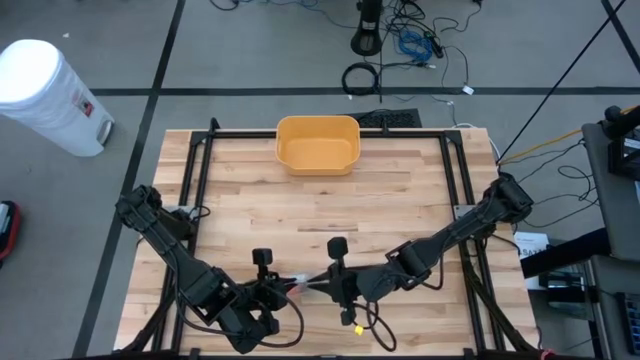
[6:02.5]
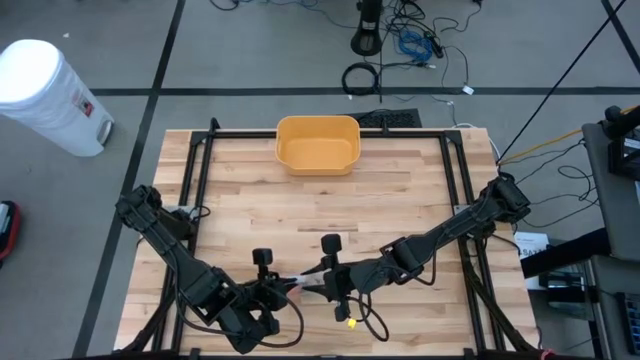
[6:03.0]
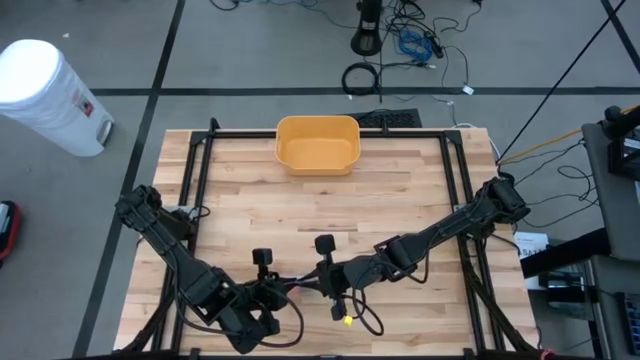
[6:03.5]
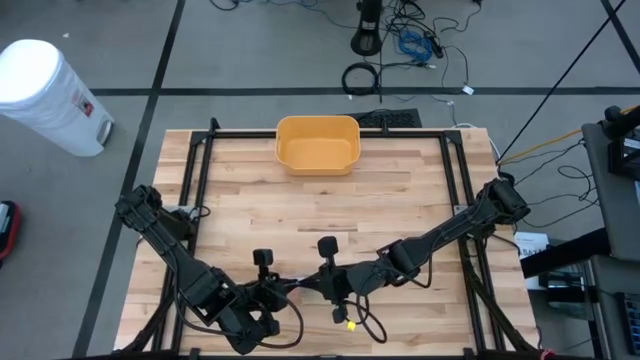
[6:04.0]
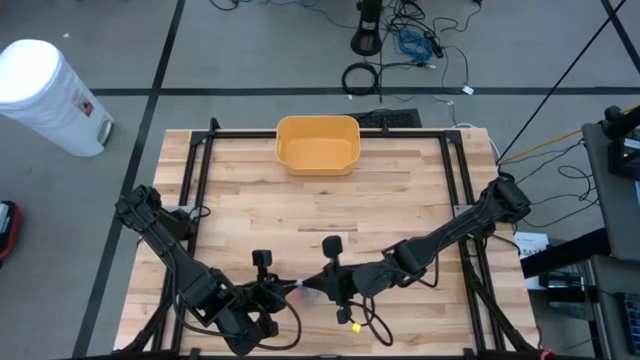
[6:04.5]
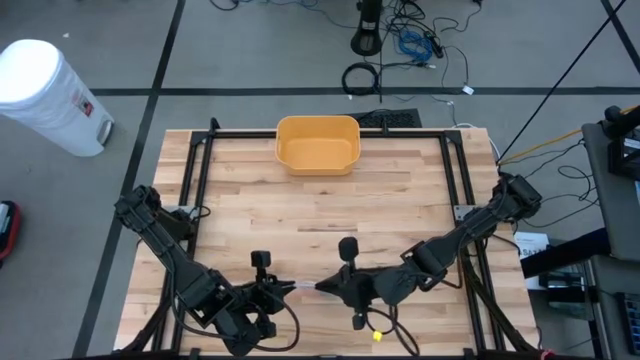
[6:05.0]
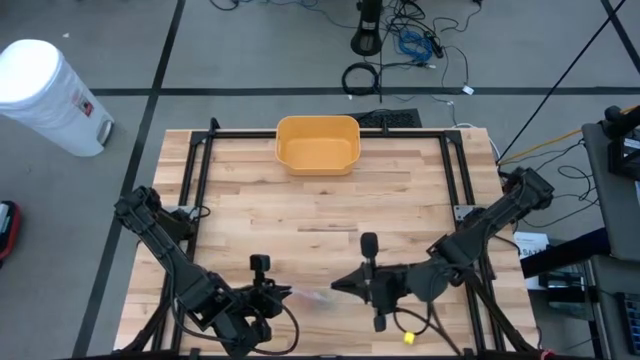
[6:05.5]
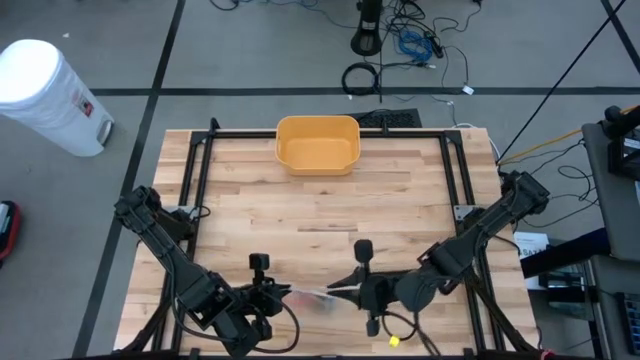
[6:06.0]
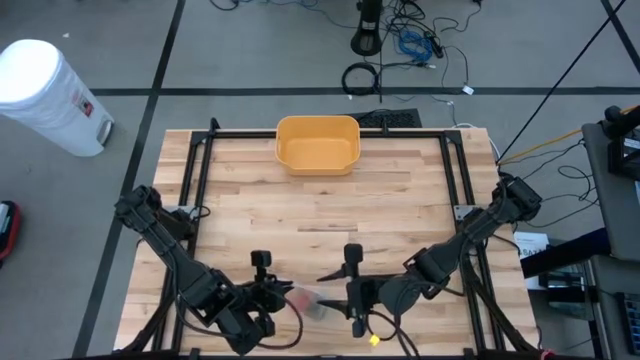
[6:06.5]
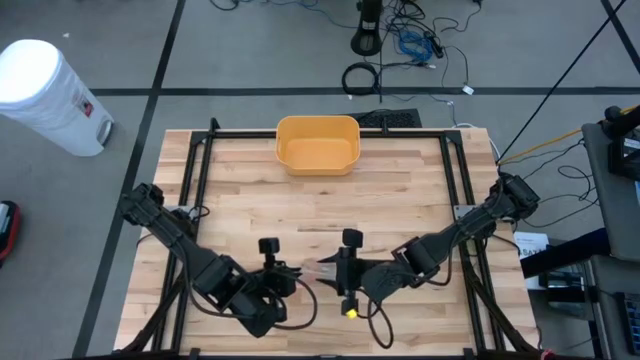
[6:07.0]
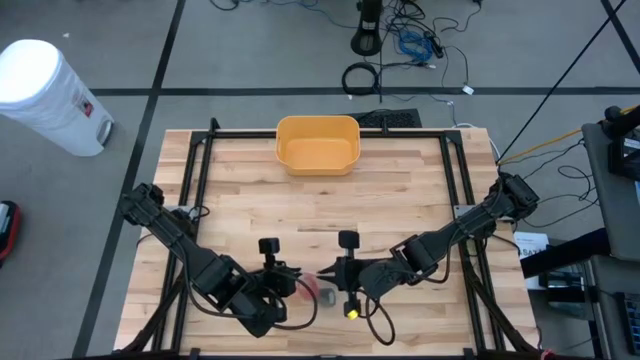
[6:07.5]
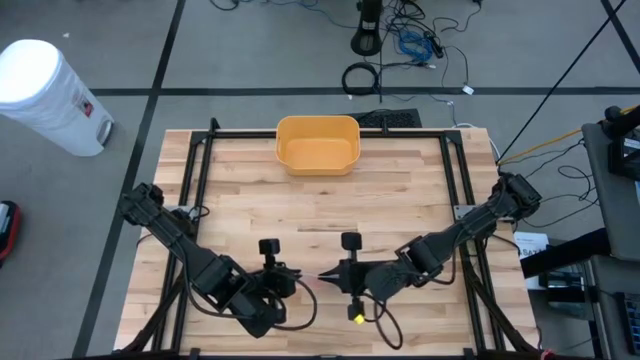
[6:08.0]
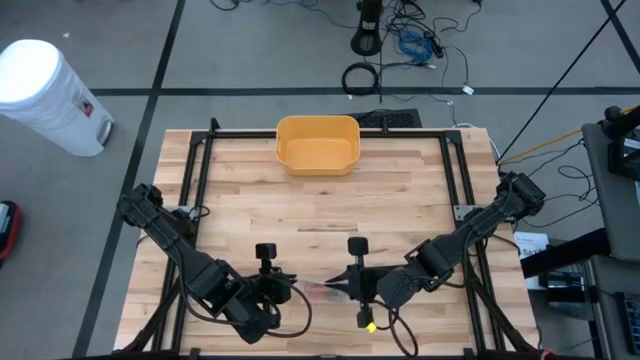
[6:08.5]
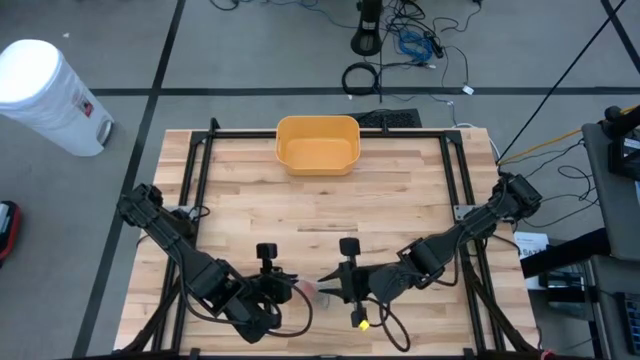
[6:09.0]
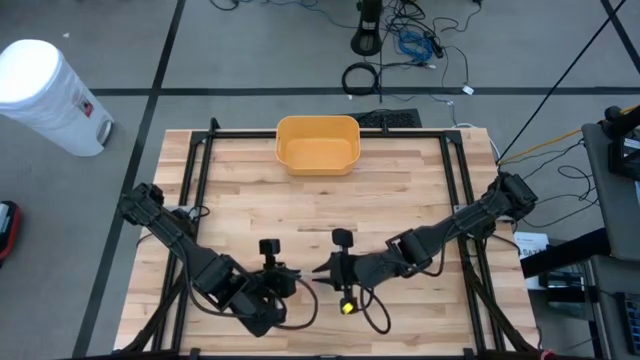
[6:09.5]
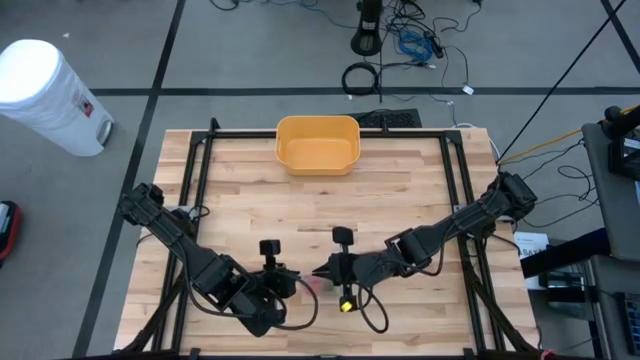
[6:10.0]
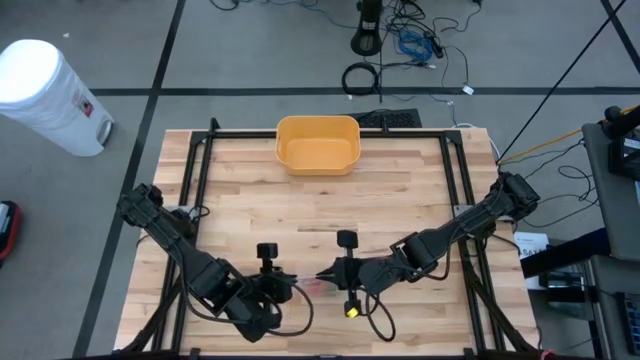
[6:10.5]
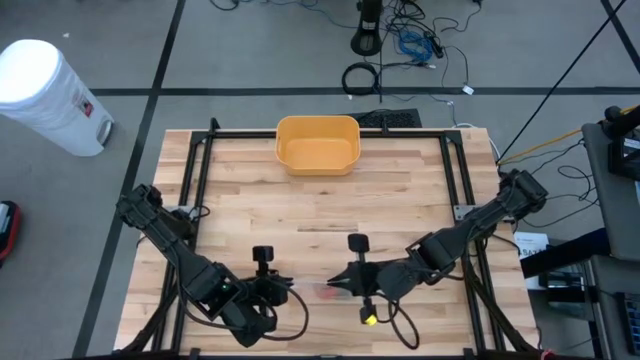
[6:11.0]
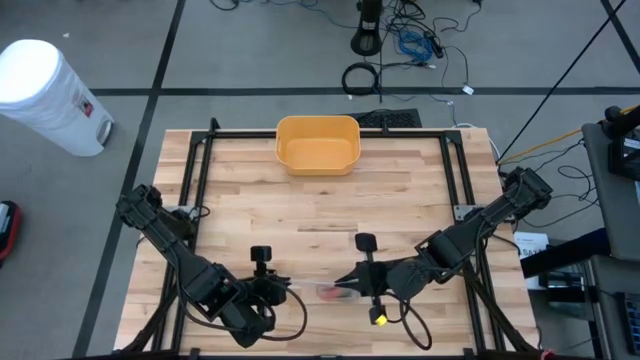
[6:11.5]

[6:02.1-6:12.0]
Task: Roll bandage
Close the transparent zip bag

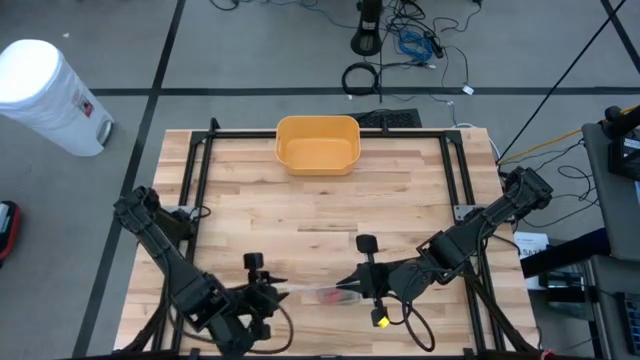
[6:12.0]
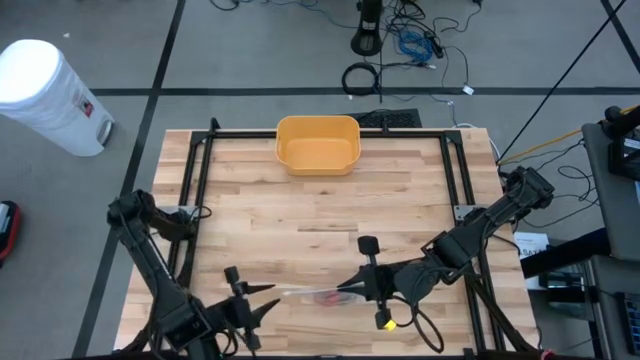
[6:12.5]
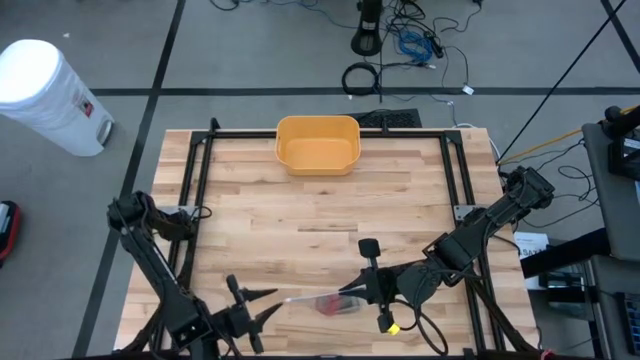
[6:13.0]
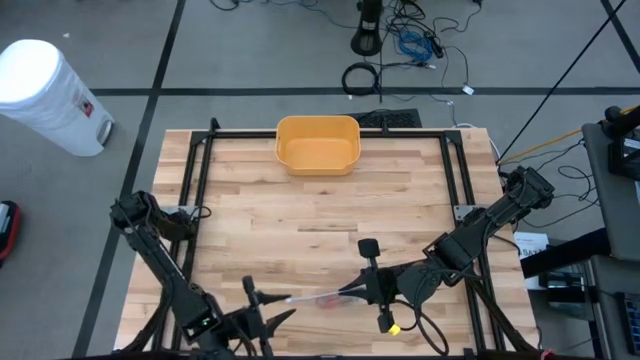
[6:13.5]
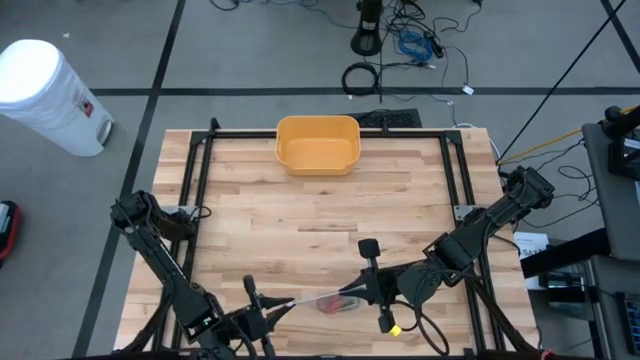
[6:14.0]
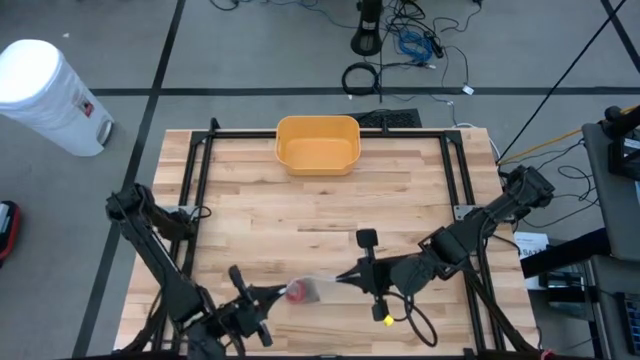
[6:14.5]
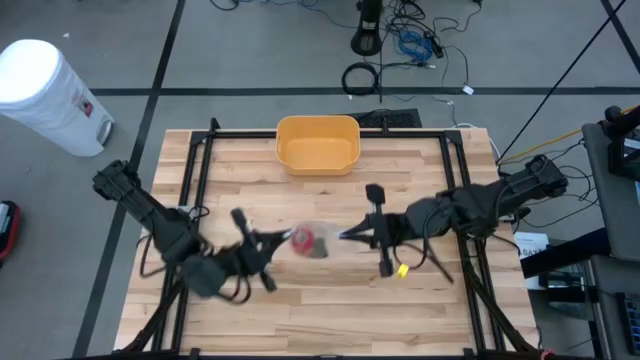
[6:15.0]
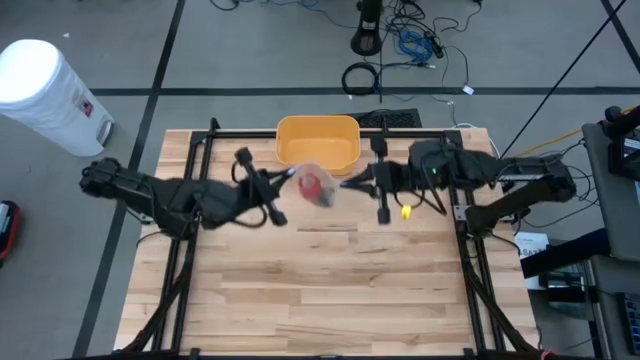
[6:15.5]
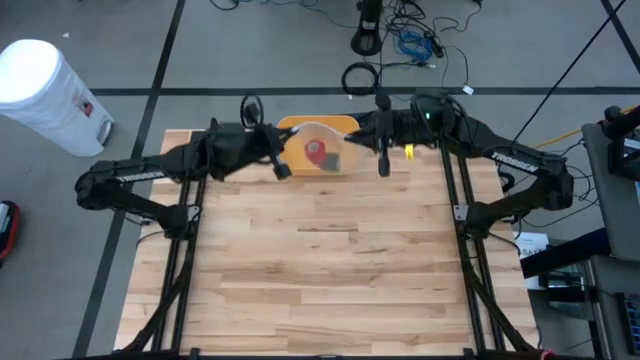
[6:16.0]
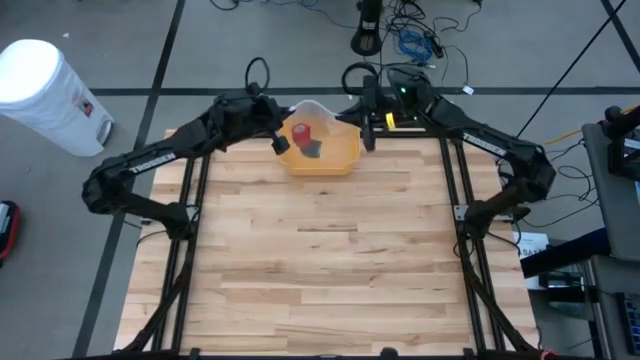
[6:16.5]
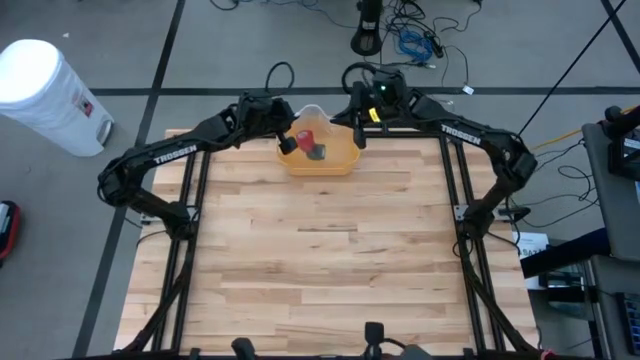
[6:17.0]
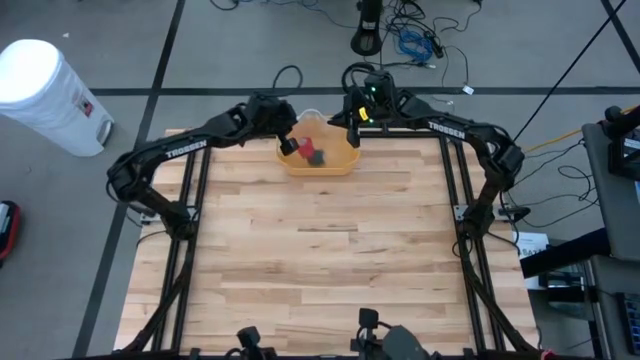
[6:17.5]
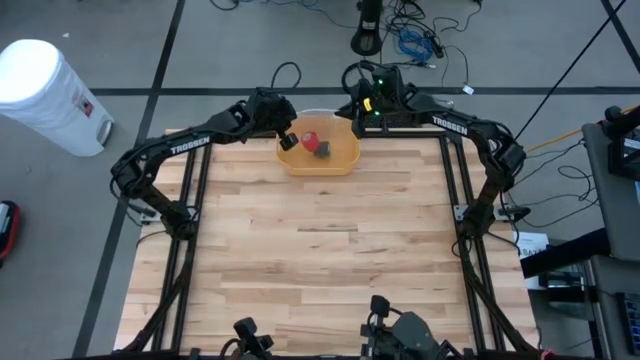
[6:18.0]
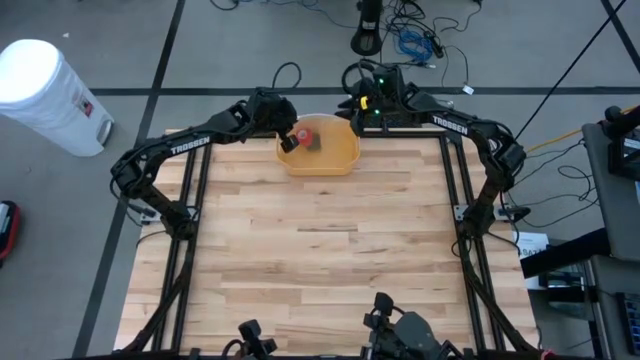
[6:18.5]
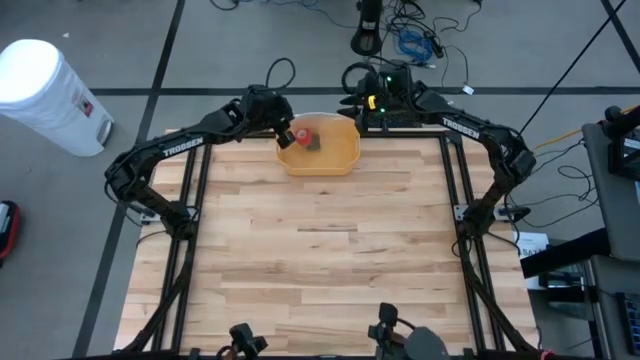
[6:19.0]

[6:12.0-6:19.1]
Put the transparent zip bag with the rolled bandages into the yellow bin

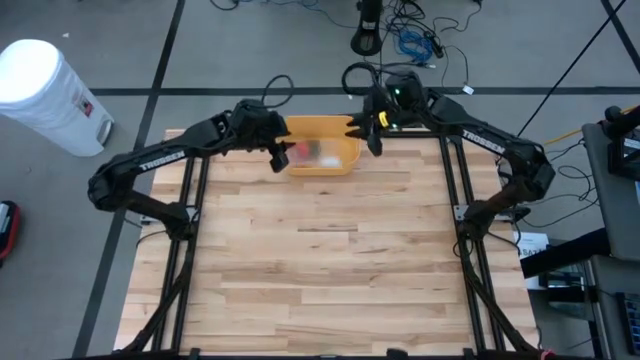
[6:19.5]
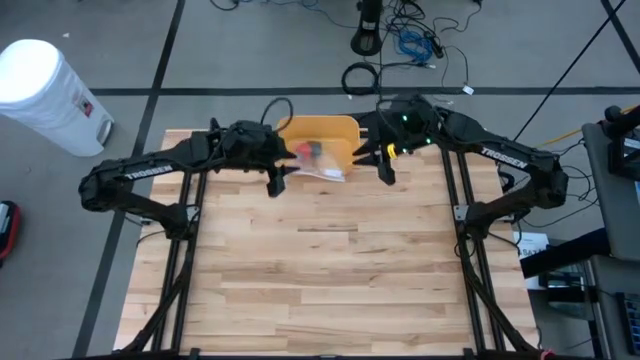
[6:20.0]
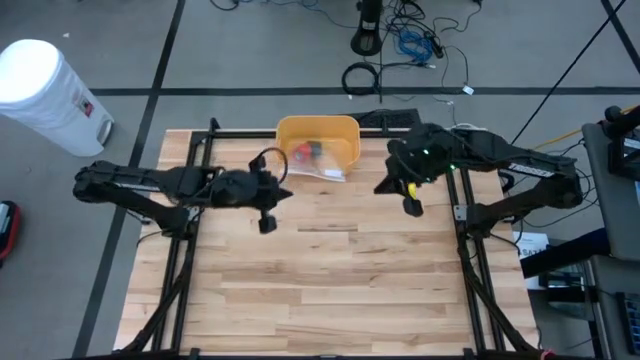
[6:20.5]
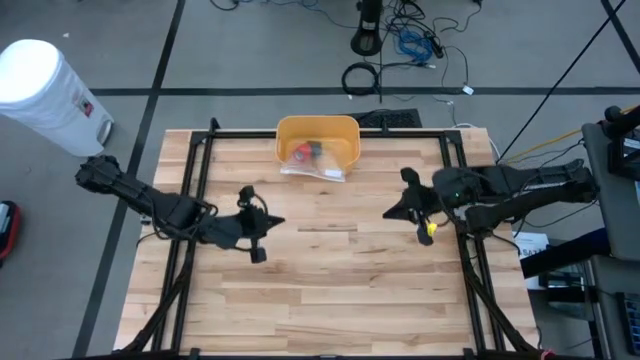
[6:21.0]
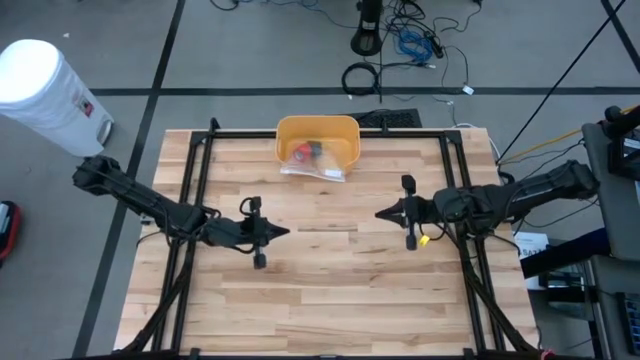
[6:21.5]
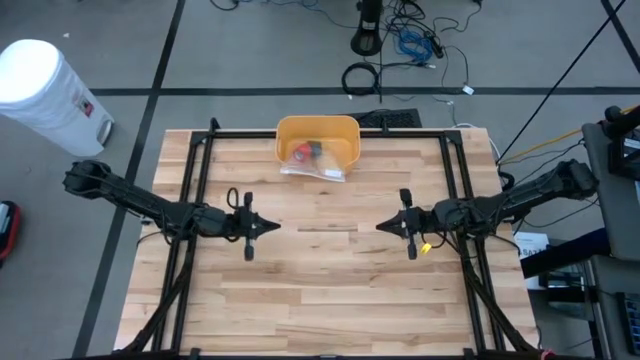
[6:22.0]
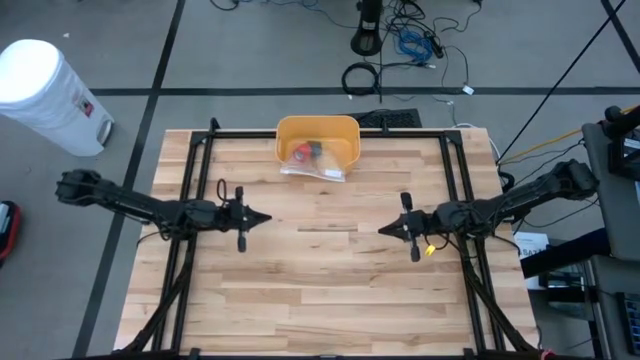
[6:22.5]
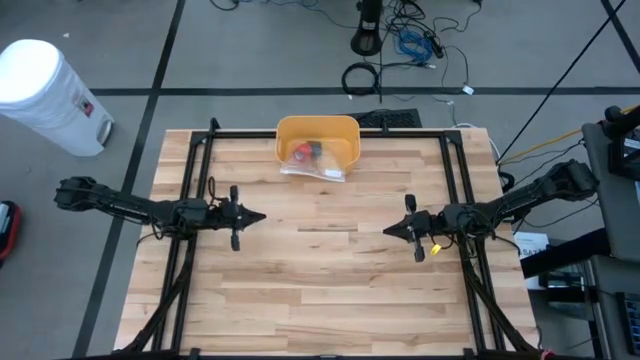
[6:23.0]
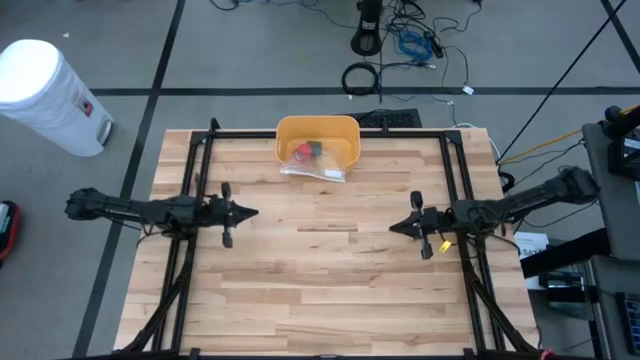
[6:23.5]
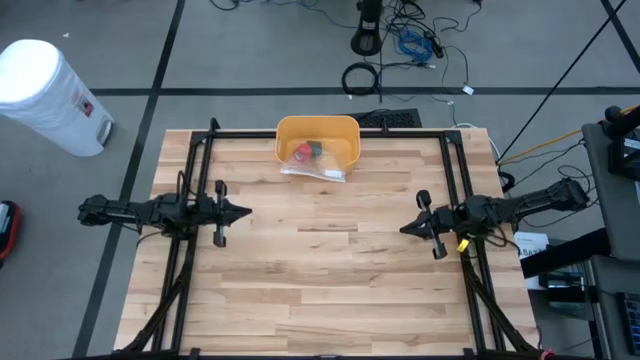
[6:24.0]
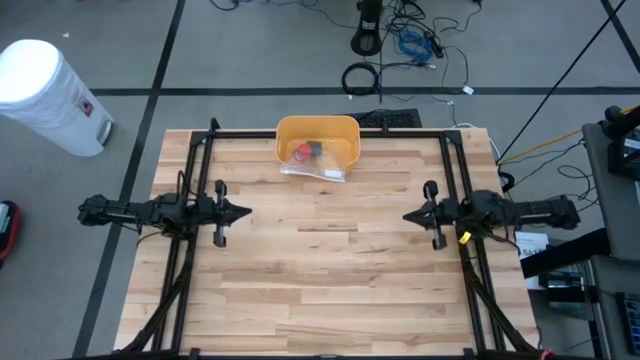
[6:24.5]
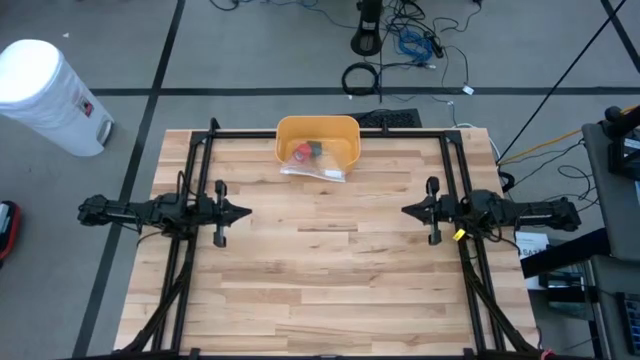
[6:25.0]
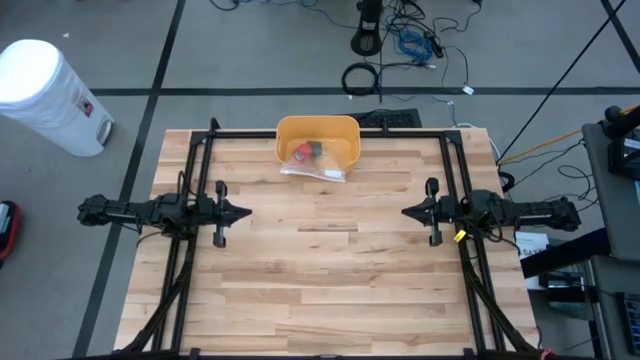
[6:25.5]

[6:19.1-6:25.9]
Return to Home Position
